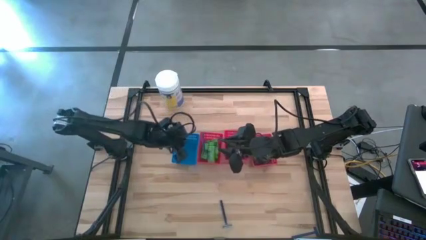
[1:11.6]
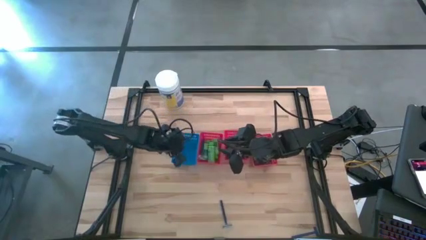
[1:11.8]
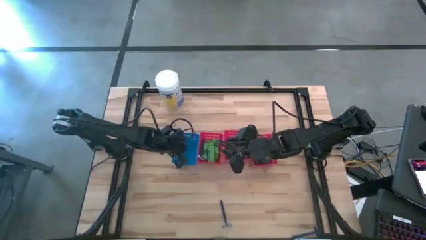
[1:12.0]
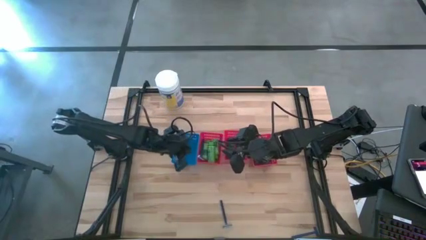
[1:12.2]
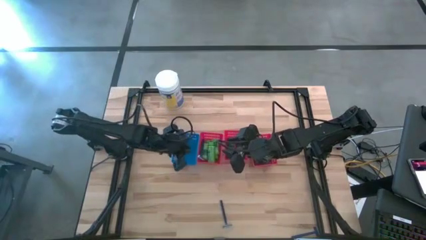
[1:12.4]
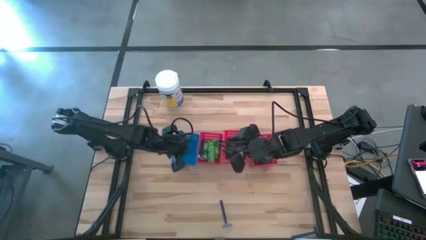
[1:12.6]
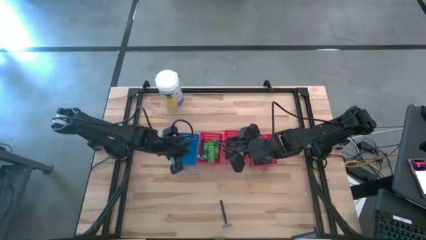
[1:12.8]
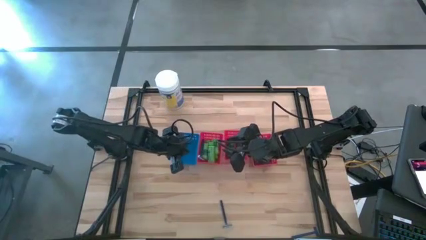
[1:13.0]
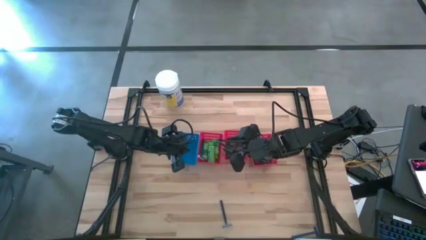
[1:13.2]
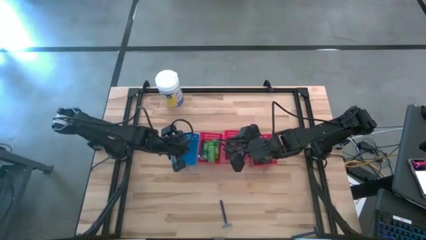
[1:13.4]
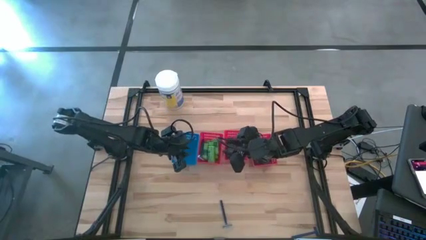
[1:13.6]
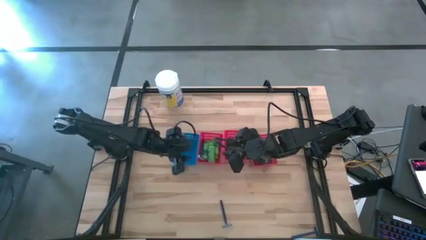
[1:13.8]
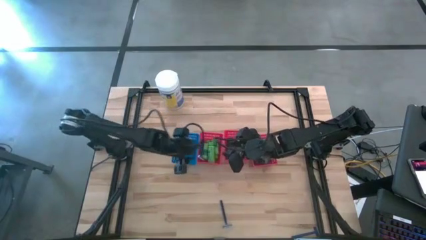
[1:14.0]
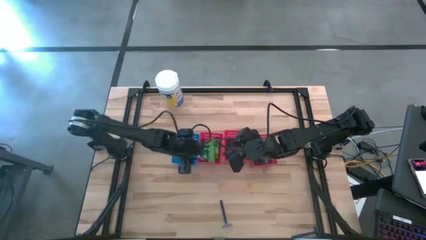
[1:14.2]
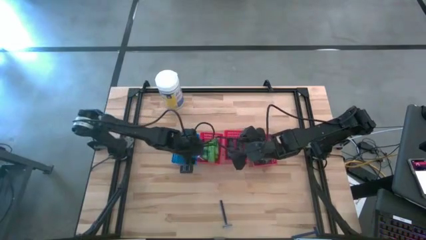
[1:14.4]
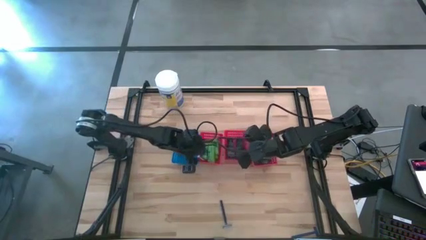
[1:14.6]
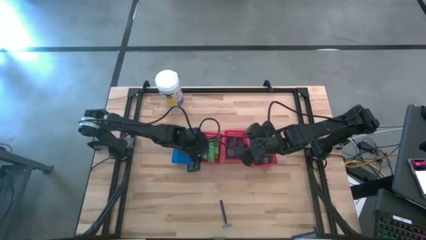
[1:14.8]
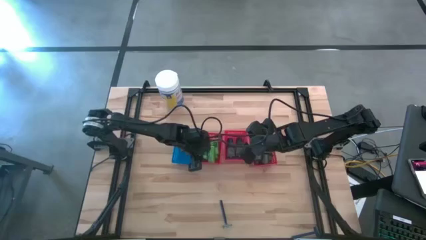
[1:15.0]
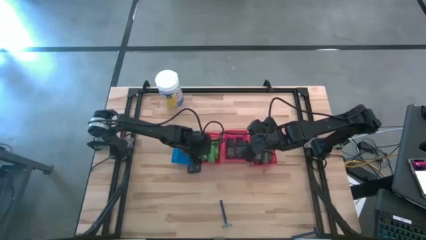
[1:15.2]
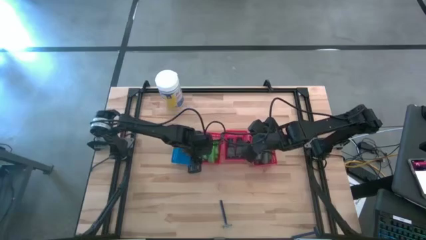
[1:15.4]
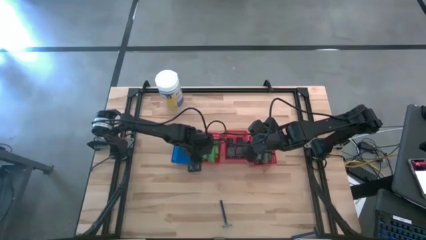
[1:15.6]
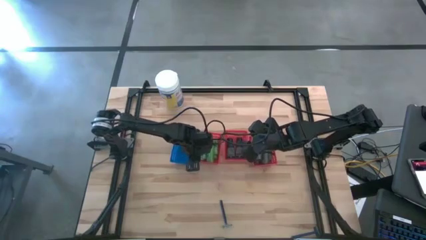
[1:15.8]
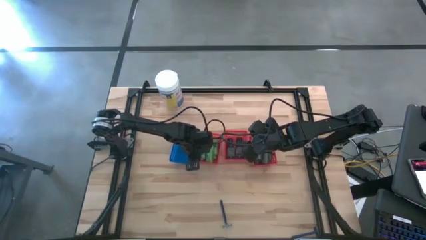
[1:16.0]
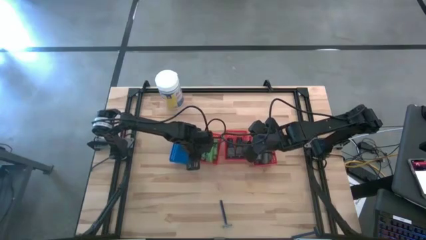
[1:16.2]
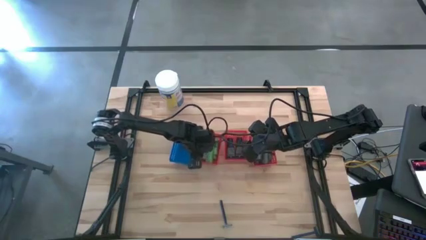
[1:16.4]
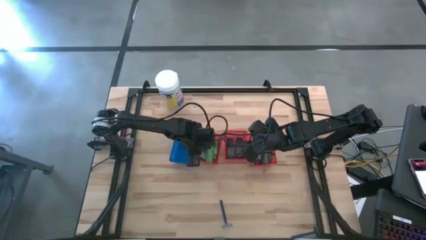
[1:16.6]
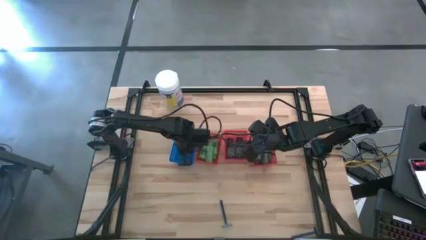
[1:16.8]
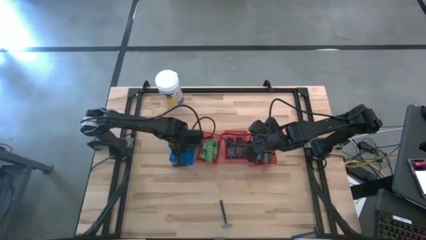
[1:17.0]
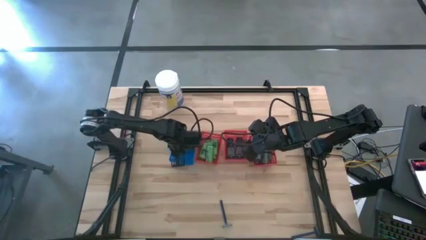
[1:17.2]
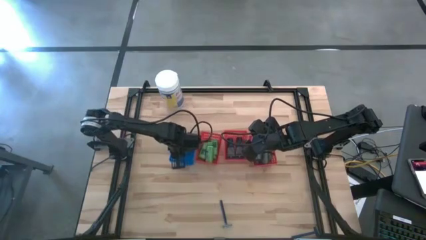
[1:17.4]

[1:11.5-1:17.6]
Task: Pick & Place Travel size toiletries
Put the blue razor into the blue basket

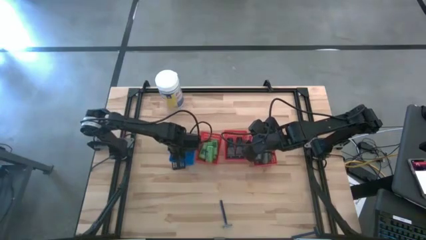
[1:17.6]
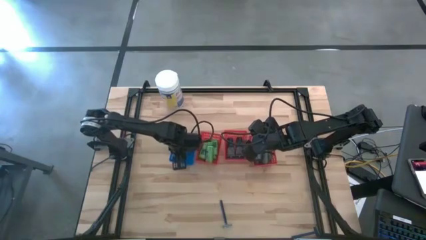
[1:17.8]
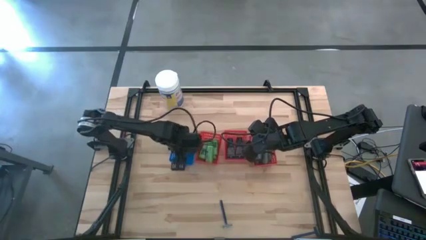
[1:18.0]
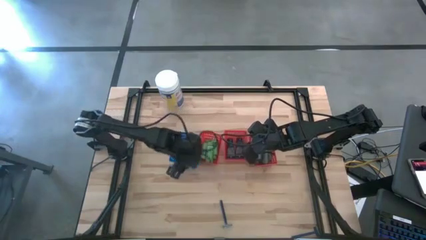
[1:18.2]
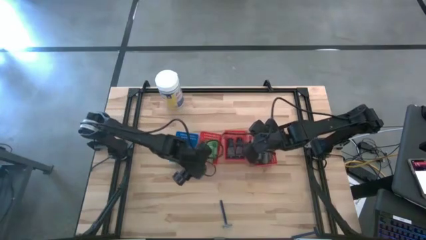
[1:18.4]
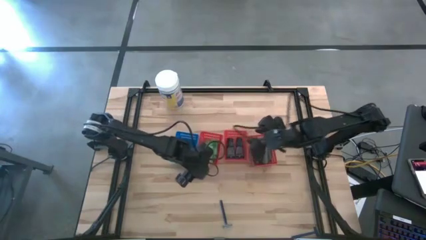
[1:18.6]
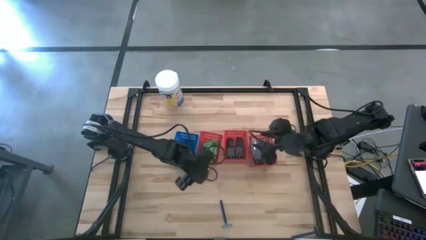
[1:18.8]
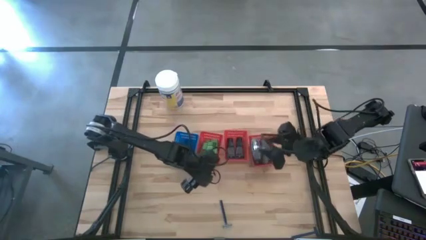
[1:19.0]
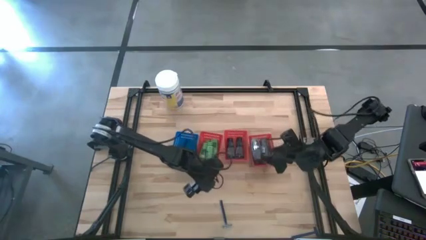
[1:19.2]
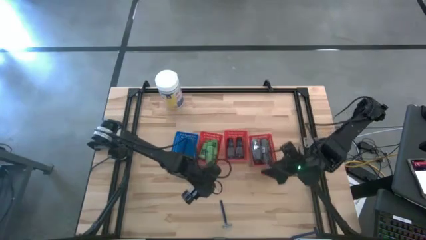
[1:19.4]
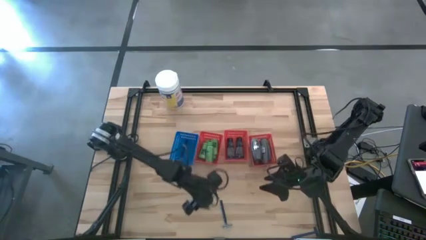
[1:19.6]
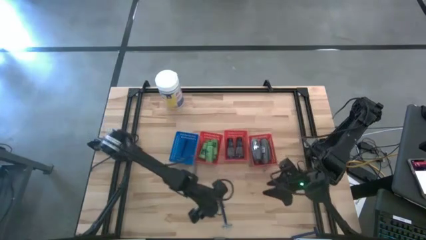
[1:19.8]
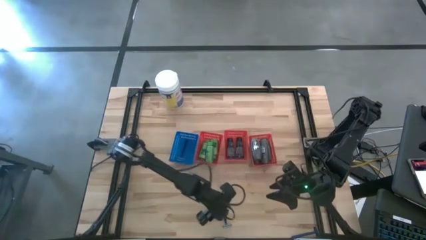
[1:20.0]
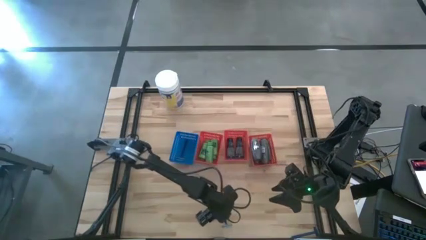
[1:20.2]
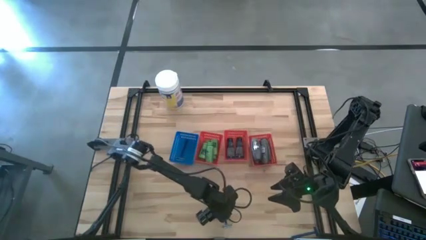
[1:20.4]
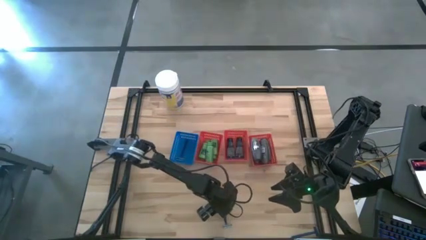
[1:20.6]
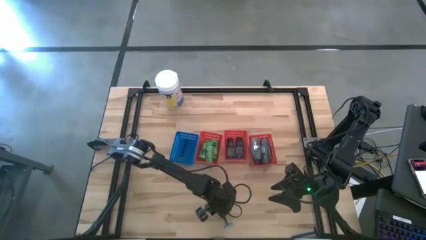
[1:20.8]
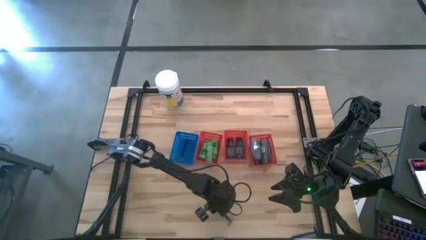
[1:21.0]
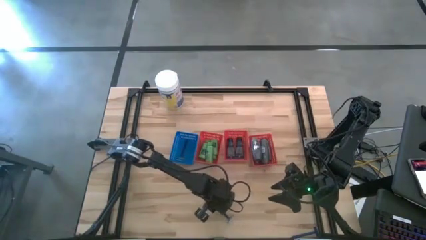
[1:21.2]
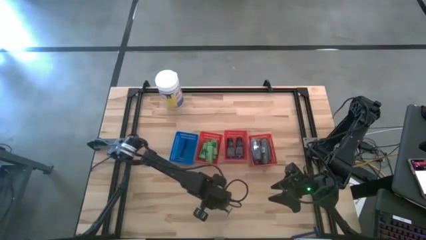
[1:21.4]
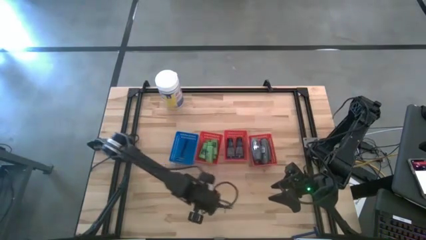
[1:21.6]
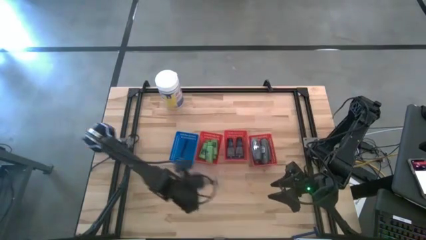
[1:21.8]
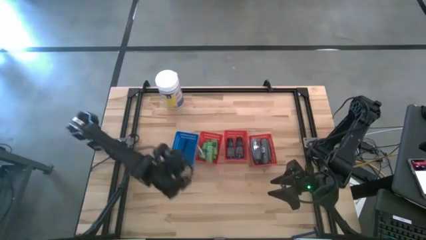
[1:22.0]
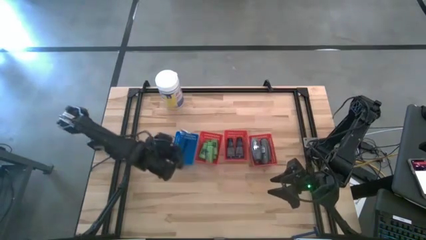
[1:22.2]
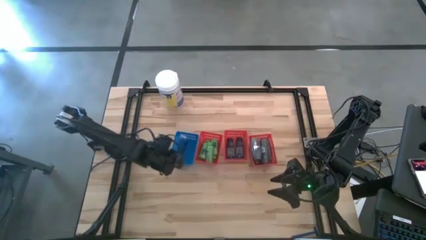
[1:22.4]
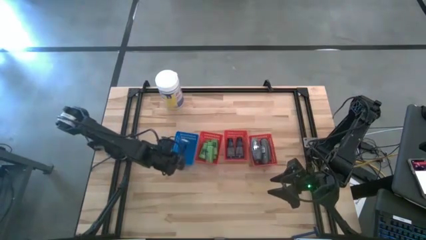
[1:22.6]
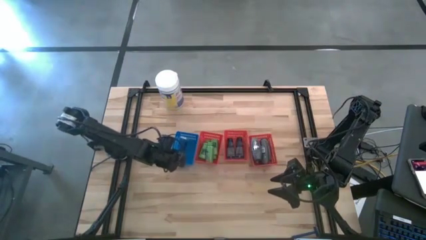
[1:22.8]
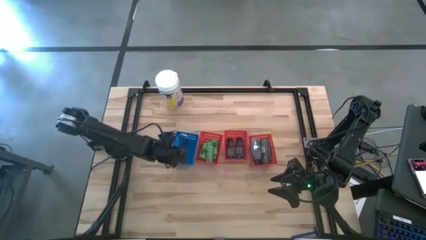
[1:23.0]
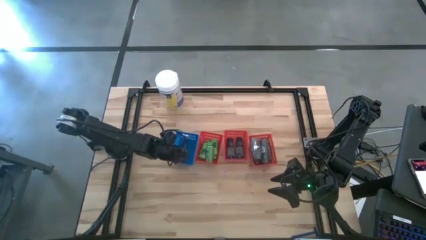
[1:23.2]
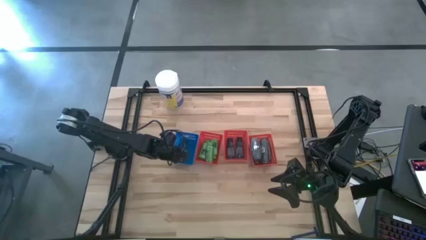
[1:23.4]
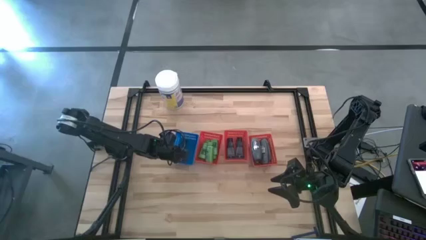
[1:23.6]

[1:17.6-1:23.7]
Put the blue razor into the blue basket

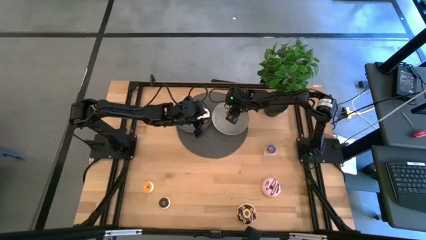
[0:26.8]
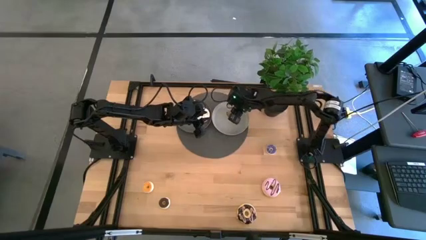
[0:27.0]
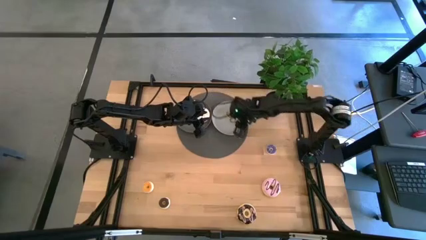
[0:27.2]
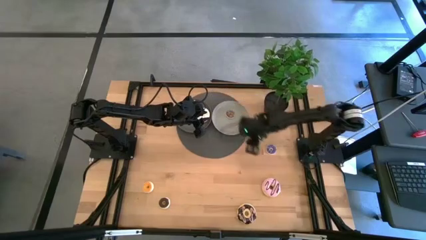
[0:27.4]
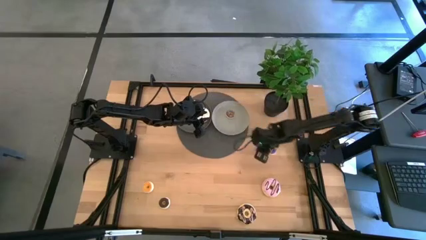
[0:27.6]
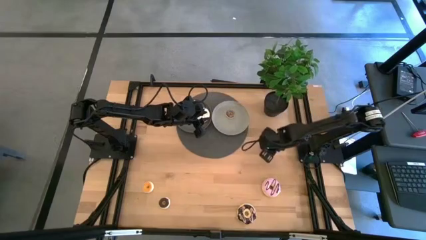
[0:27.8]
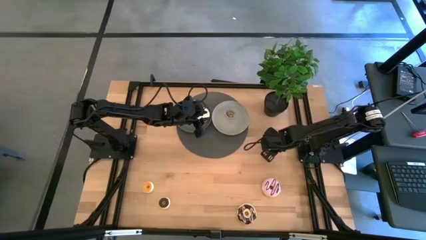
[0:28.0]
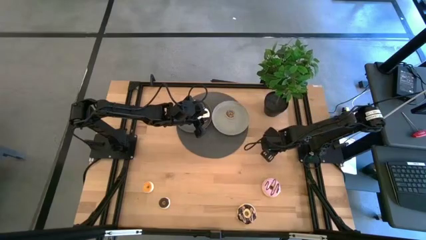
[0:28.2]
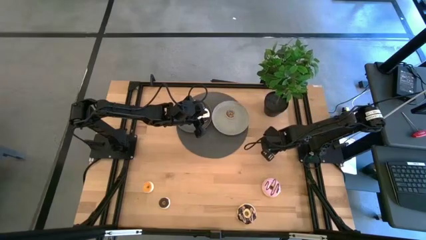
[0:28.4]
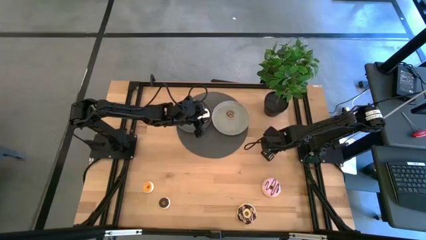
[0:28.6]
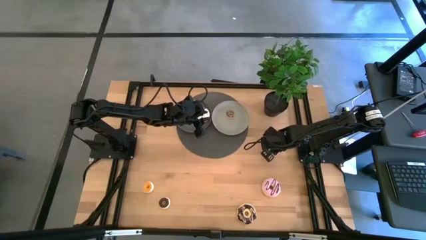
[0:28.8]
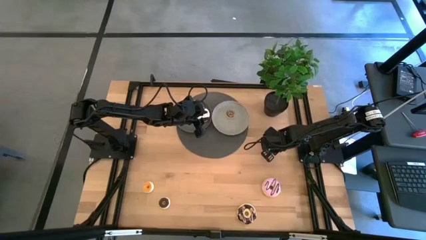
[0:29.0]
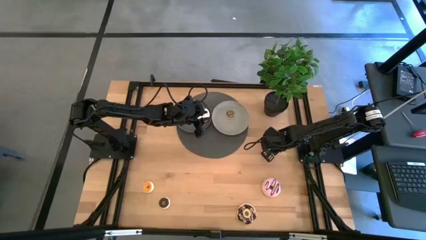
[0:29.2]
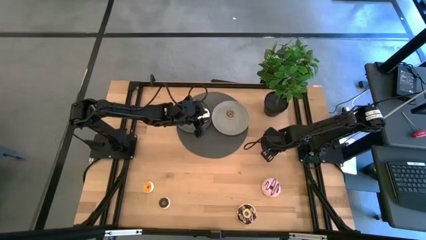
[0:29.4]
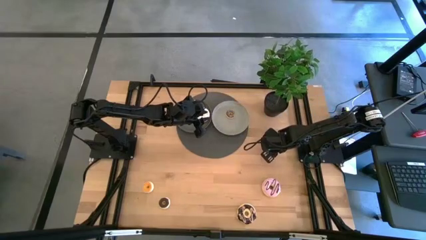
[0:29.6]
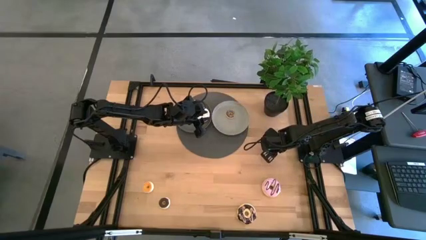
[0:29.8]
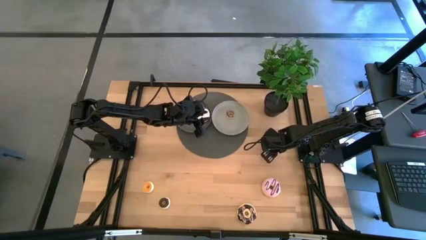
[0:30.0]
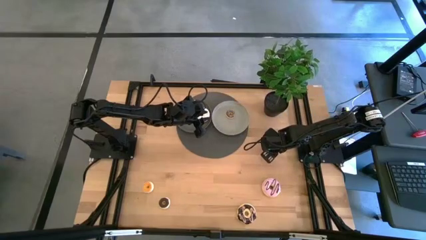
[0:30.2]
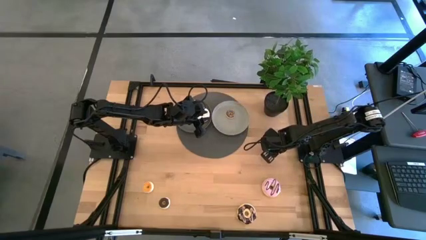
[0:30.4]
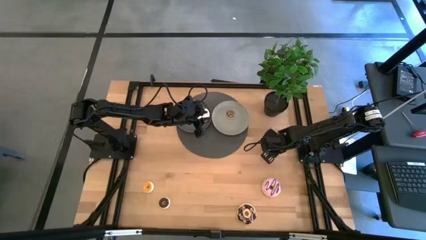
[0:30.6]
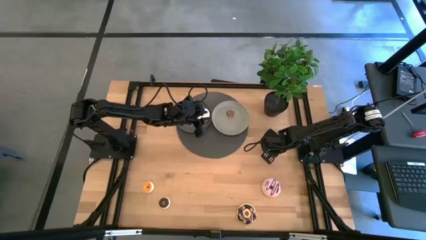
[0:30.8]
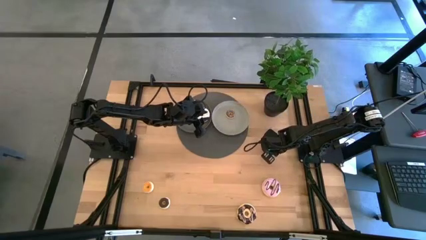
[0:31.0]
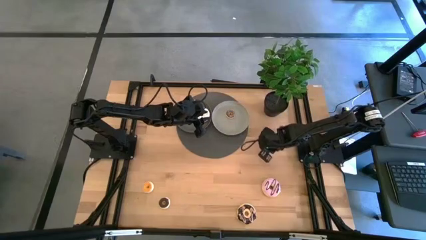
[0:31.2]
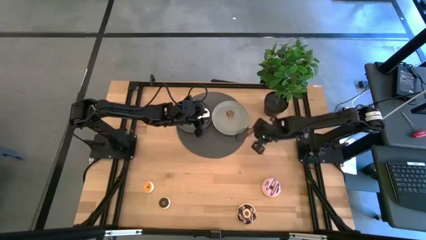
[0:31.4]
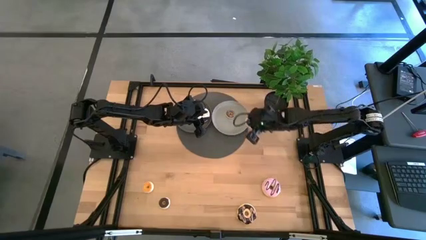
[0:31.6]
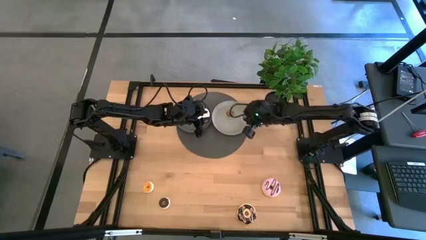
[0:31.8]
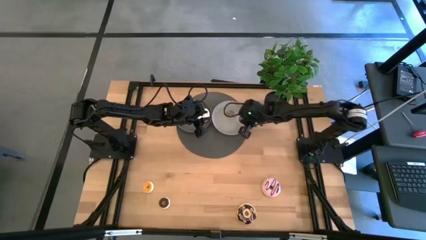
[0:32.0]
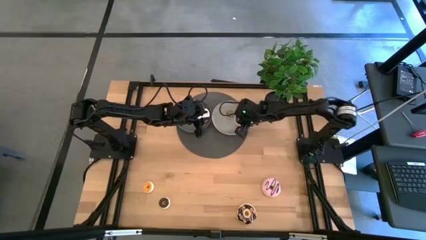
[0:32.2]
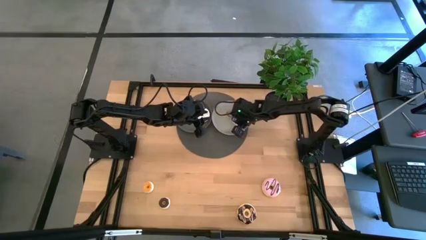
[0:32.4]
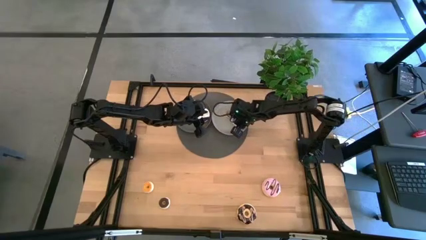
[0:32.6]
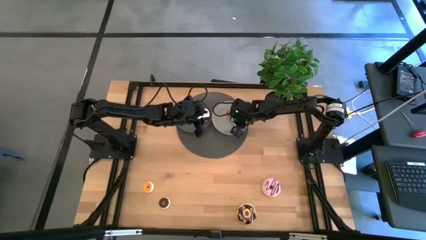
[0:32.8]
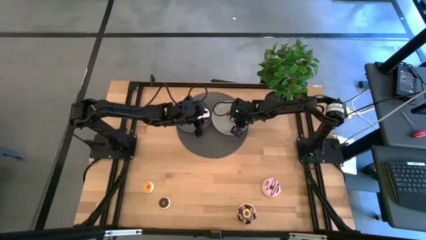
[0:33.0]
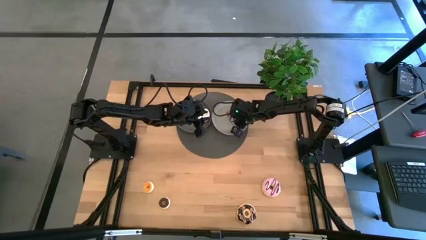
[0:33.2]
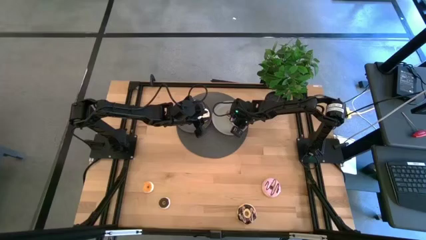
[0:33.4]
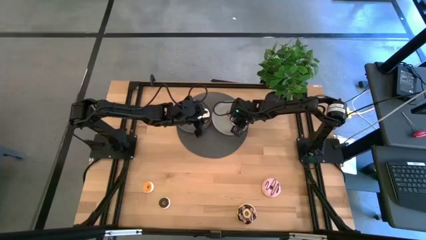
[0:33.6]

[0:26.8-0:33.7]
Task: Pick & Place donuts
Put the small blue donut on the gray plate
